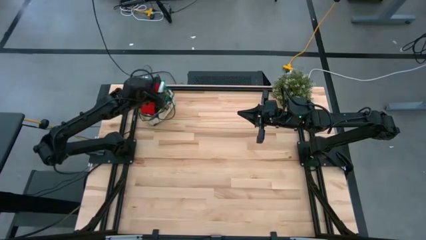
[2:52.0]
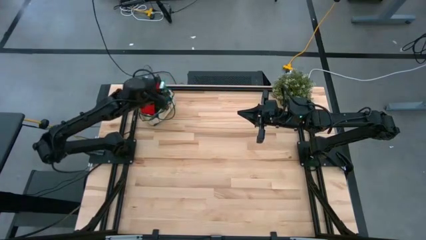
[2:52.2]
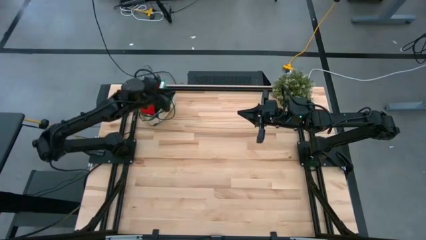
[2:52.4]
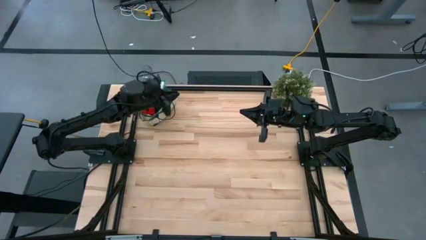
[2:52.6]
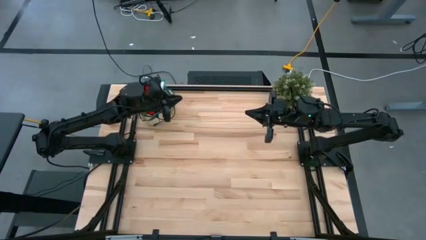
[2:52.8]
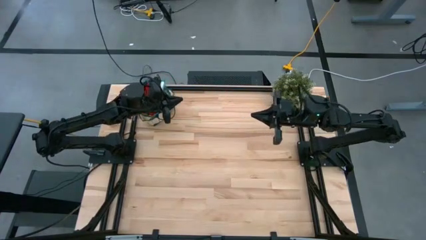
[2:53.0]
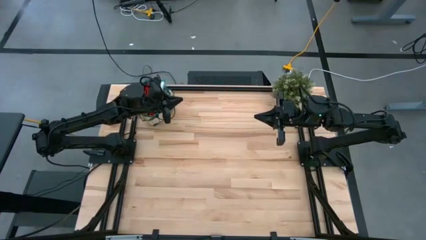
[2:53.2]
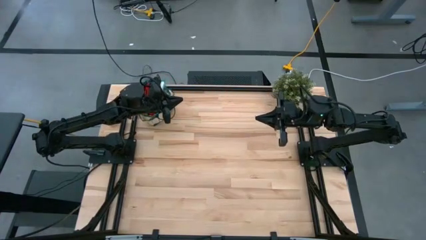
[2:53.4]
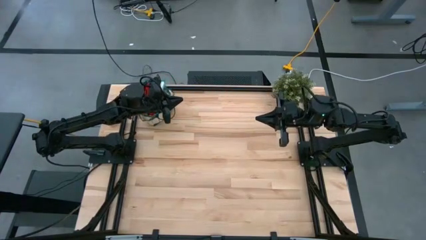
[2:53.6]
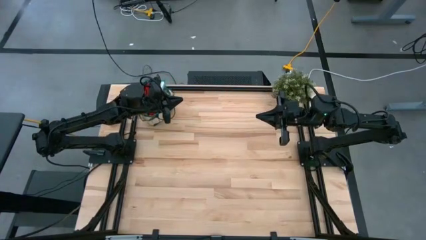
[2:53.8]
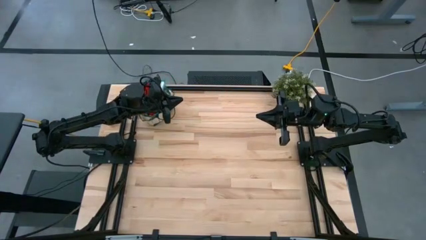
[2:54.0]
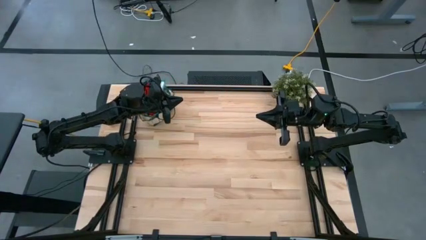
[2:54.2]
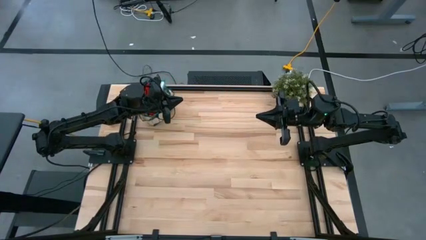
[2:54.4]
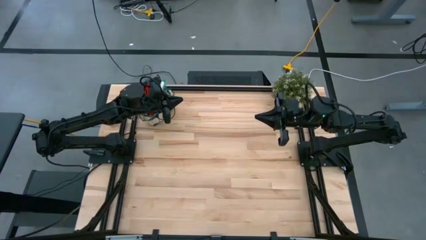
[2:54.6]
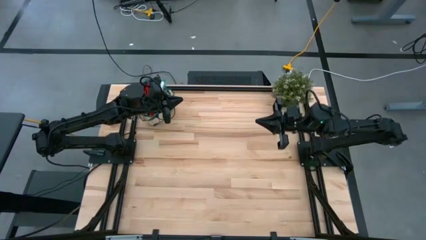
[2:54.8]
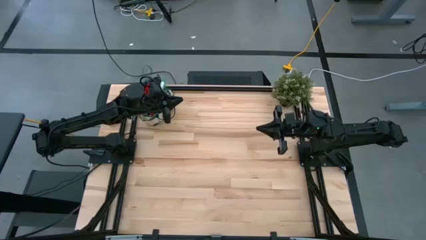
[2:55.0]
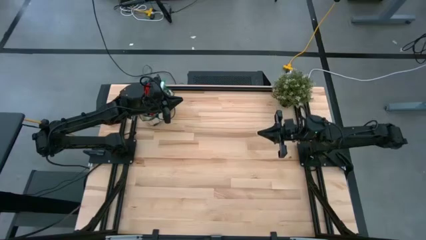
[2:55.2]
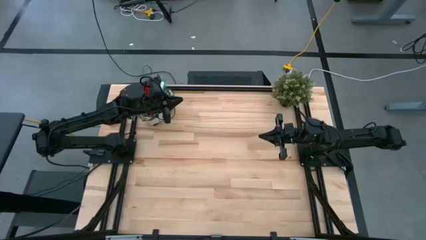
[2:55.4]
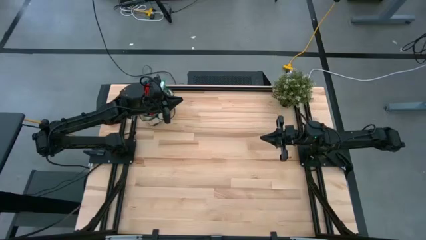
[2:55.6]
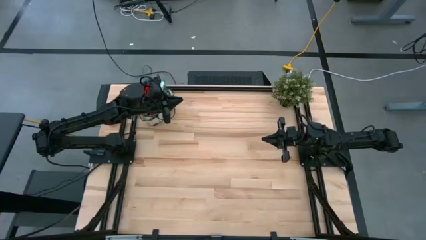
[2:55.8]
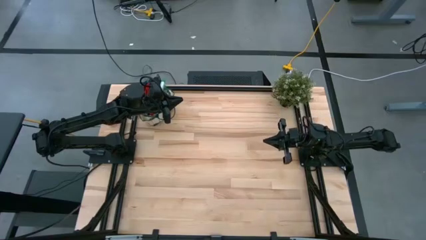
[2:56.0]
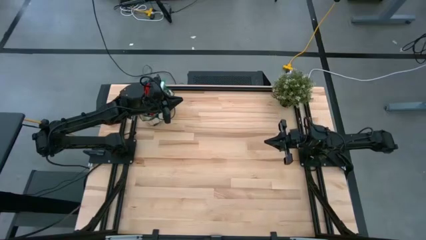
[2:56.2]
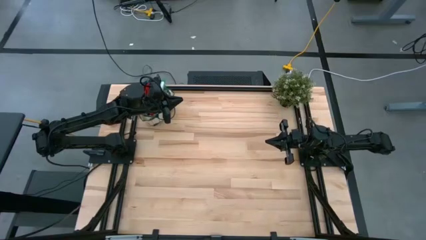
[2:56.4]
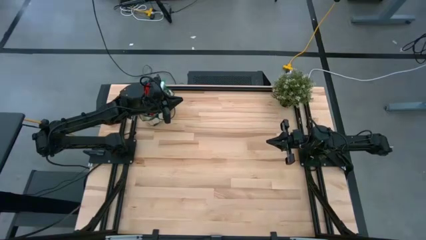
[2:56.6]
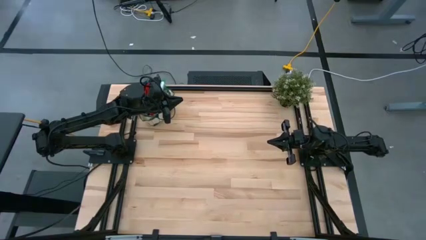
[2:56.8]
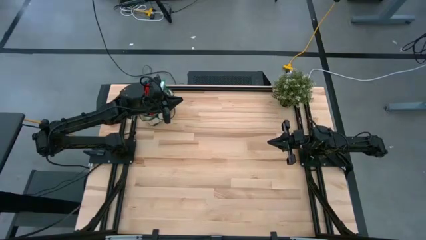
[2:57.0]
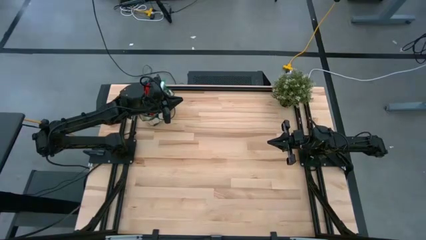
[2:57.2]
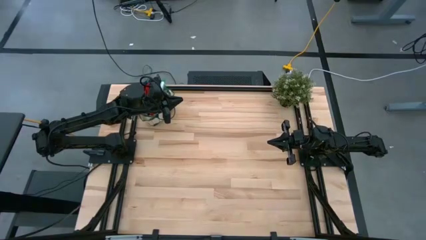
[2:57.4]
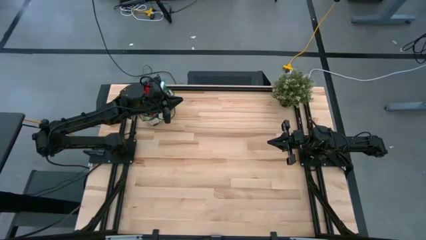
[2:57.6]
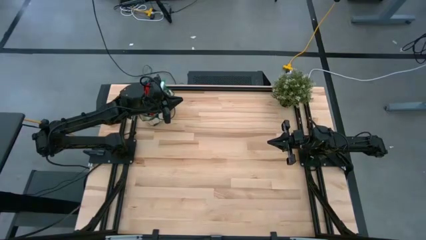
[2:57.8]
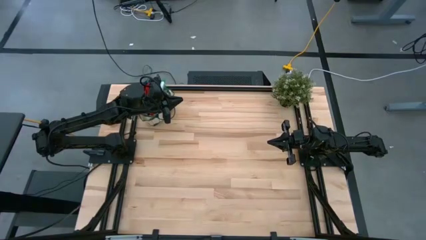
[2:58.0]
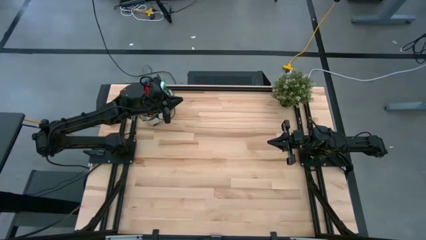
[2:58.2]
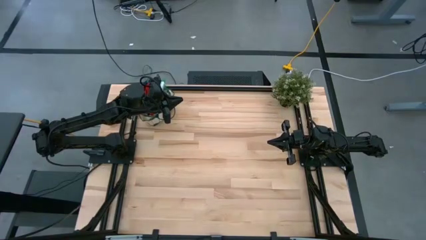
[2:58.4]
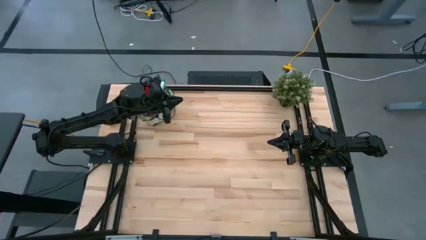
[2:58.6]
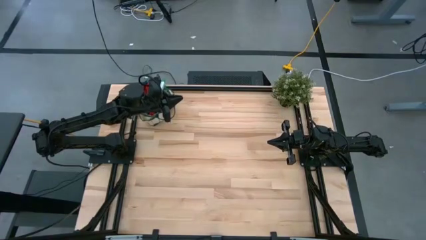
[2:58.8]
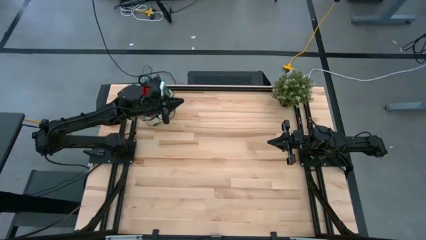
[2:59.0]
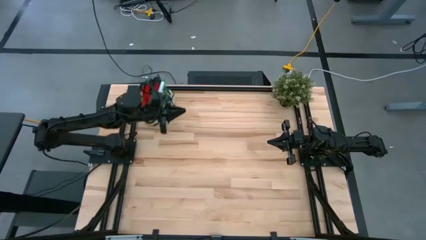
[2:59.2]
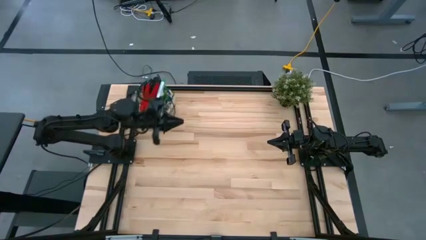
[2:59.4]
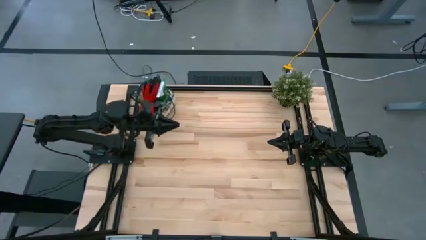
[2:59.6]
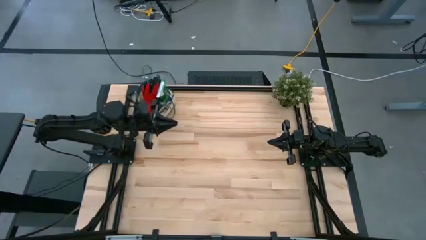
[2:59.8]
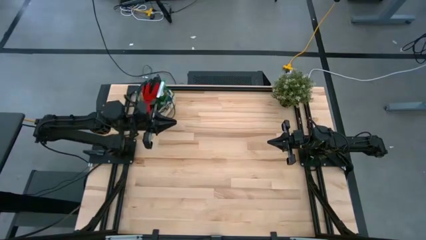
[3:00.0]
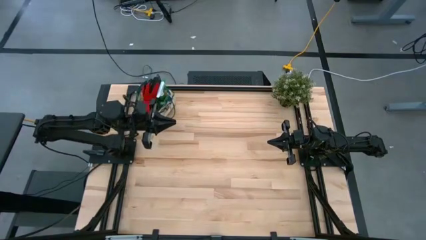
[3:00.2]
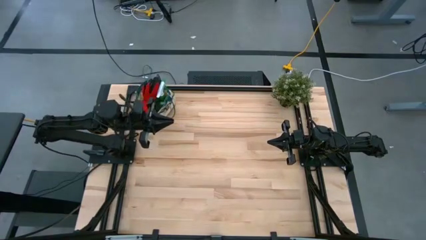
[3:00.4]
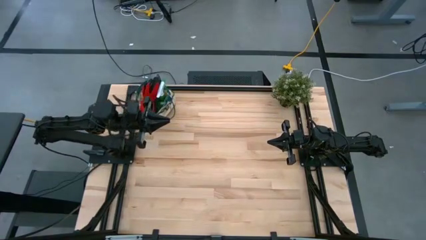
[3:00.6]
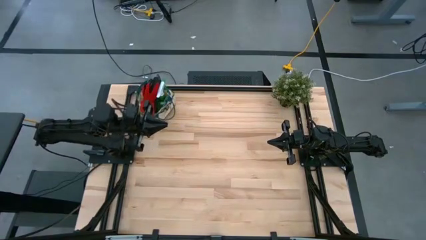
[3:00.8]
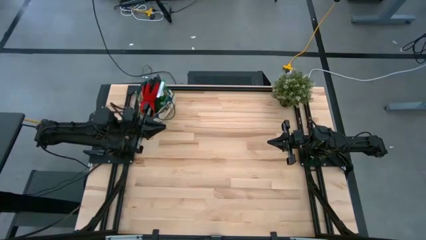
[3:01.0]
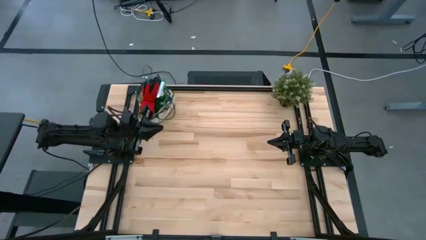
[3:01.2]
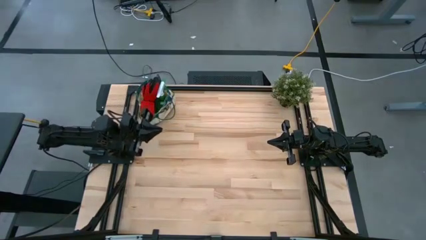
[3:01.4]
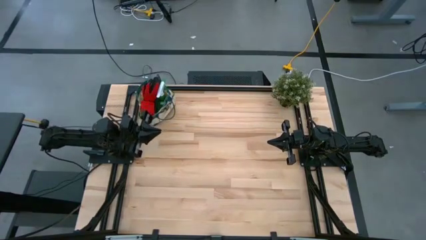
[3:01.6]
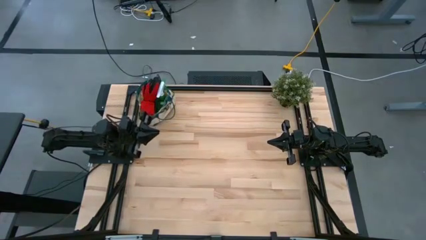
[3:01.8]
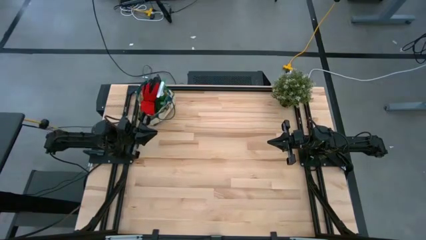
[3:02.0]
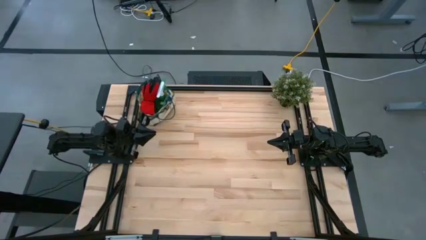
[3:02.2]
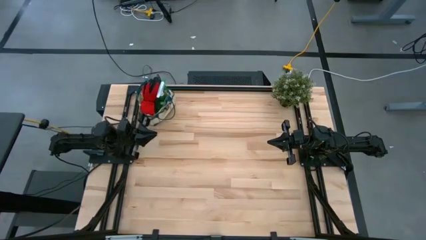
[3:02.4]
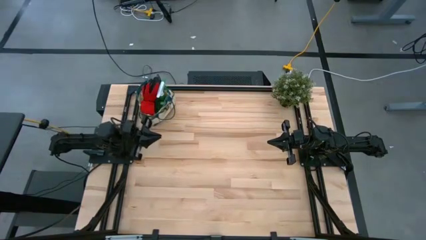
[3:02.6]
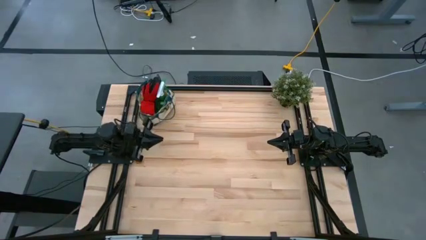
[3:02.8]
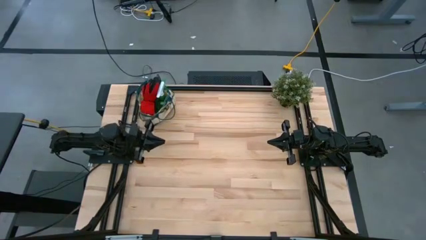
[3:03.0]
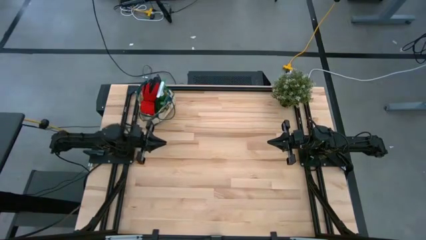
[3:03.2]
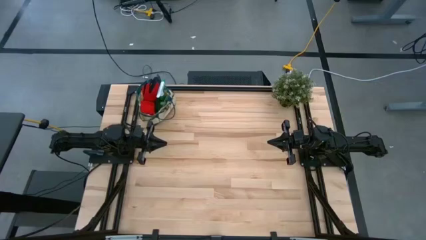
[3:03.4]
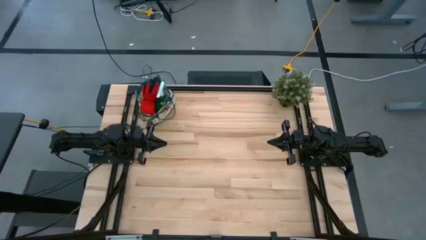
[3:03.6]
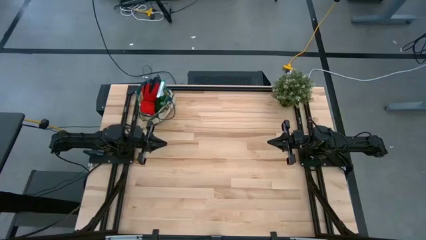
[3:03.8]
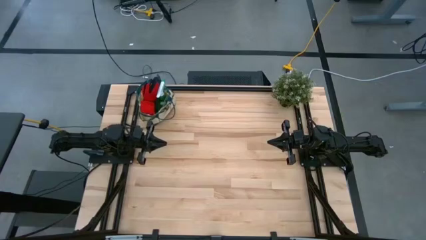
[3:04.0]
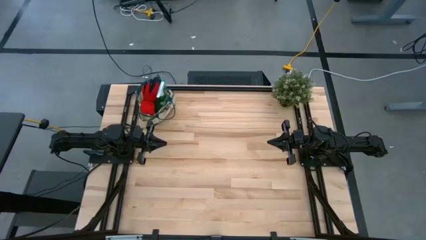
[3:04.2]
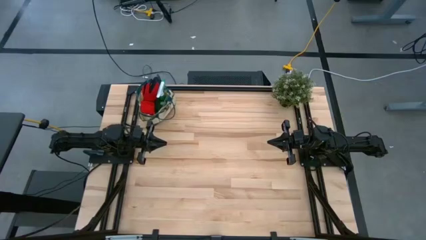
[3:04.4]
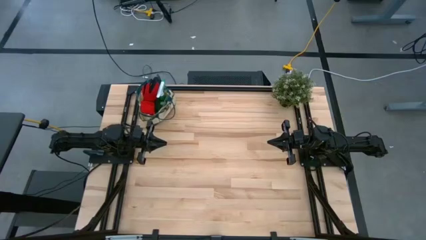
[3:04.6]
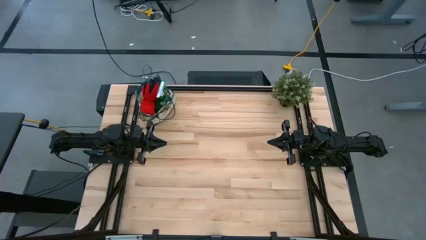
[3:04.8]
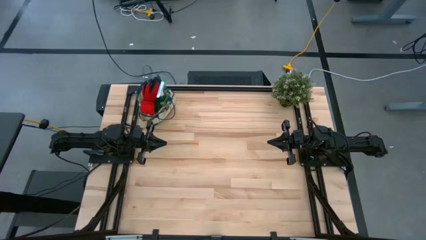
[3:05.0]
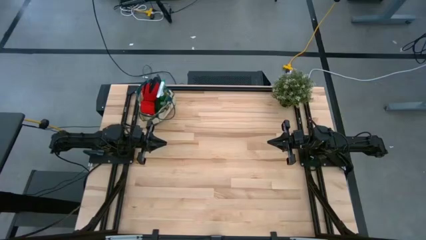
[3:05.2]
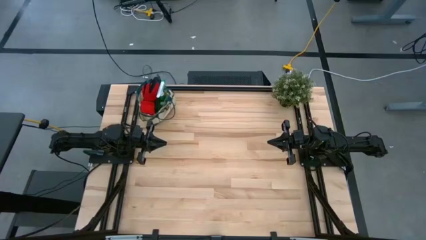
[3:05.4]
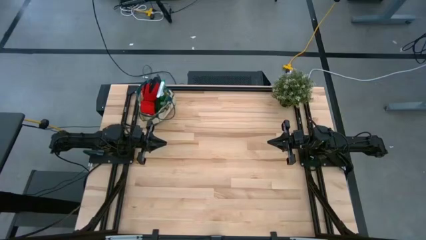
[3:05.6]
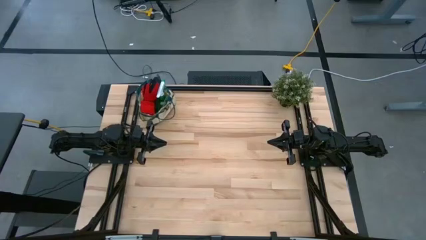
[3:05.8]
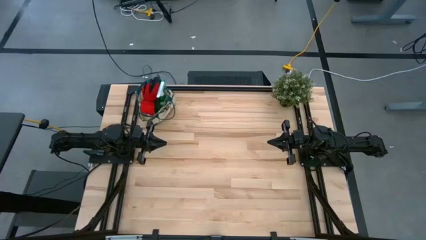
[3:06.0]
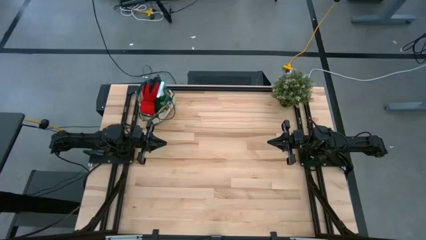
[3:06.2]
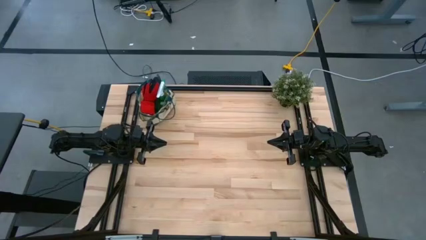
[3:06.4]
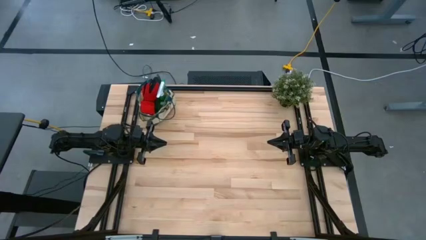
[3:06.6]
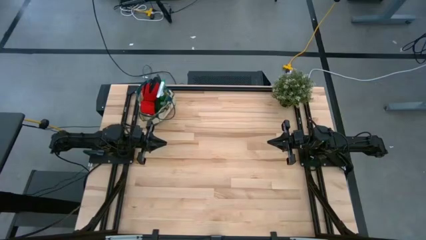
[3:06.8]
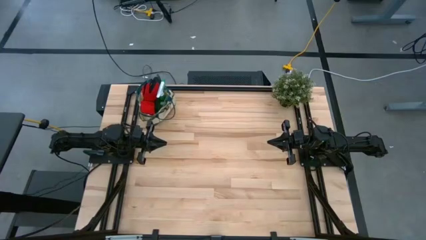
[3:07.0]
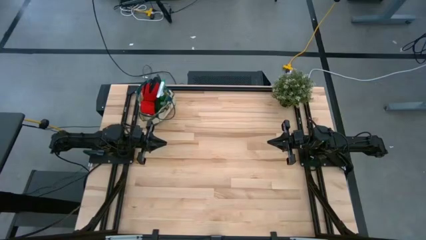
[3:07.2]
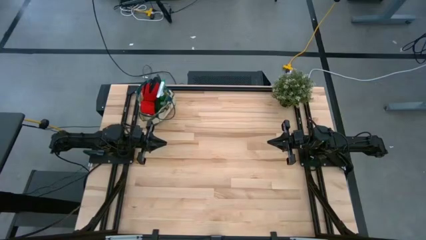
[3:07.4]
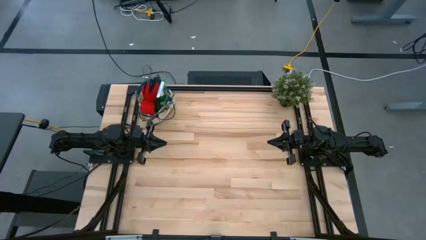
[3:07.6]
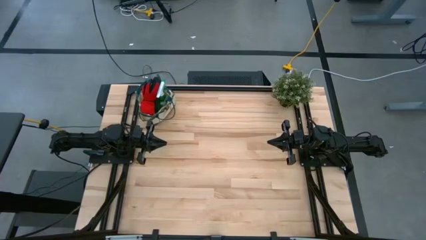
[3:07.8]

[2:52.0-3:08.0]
Task: Pick & Place Garden tools in Gardening bag
Return to Home Position

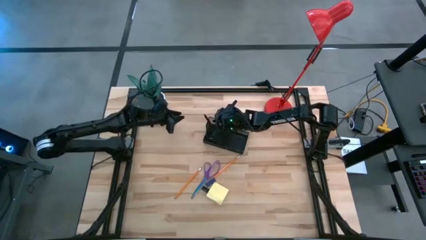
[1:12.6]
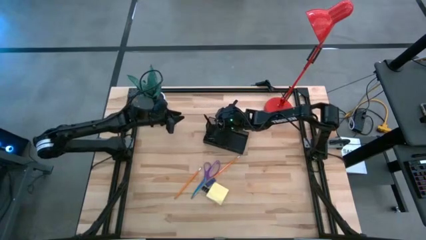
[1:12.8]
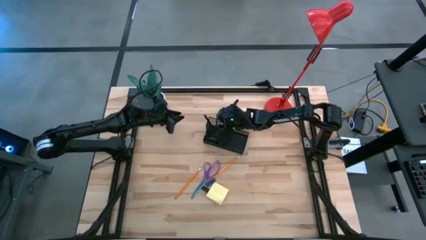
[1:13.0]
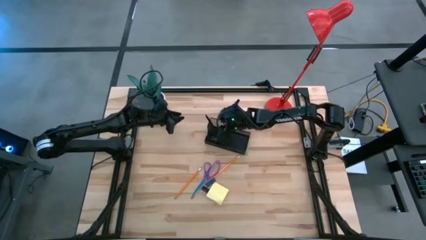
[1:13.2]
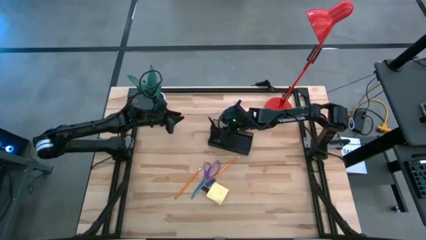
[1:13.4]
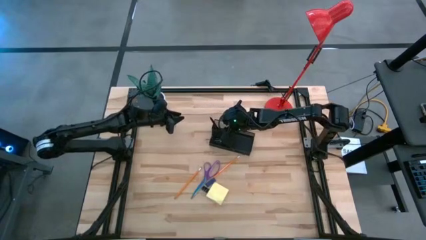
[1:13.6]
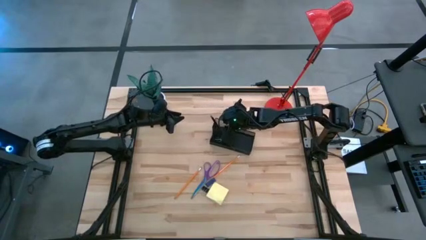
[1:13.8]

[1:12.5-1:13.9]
Task: Pick and place office supplies into organizer
Adjust the black desk organizer
